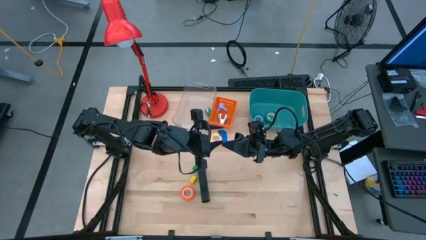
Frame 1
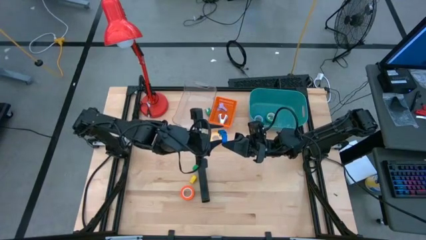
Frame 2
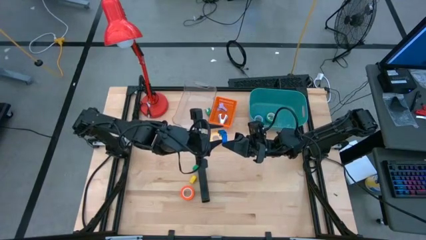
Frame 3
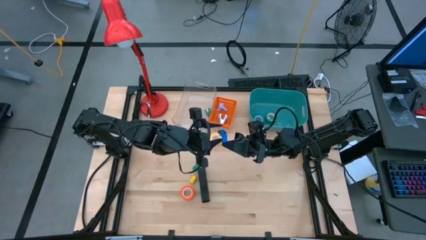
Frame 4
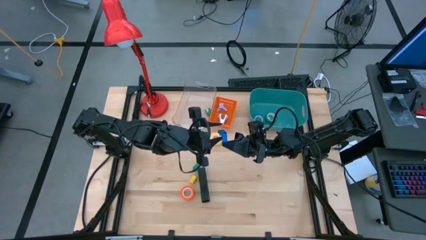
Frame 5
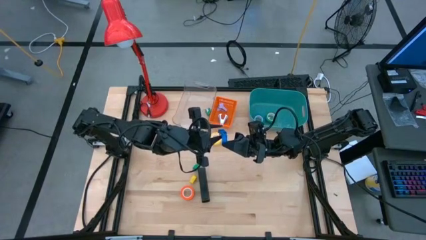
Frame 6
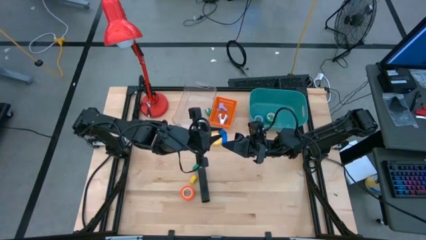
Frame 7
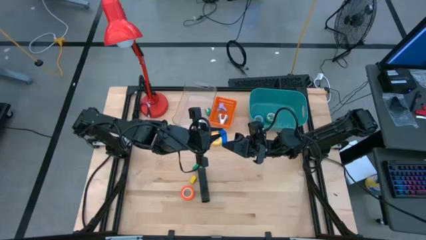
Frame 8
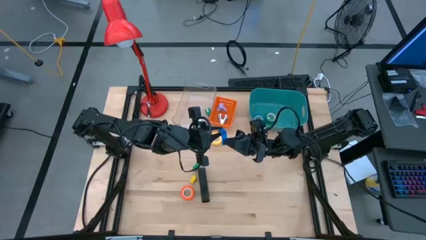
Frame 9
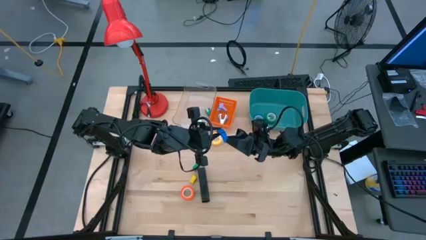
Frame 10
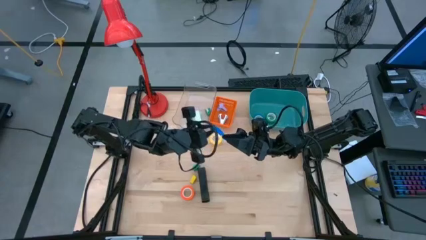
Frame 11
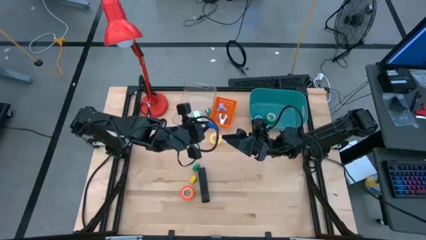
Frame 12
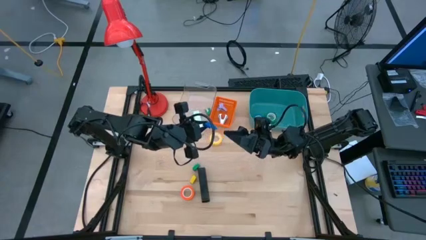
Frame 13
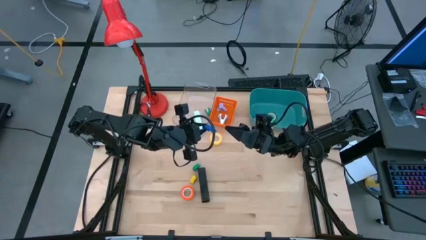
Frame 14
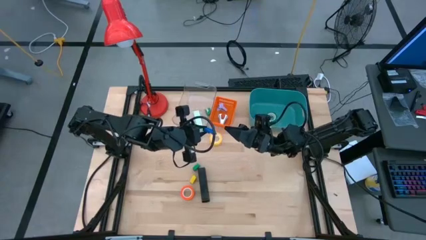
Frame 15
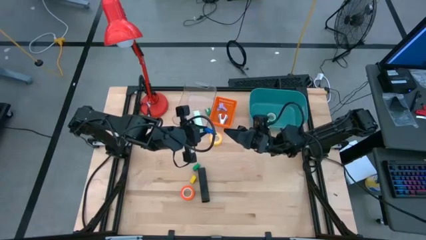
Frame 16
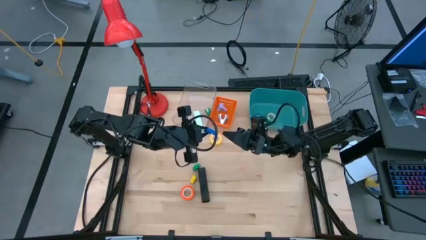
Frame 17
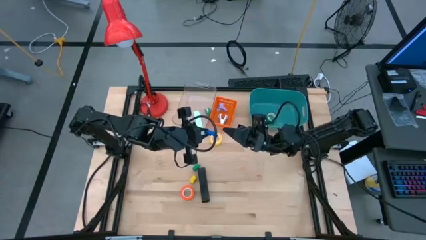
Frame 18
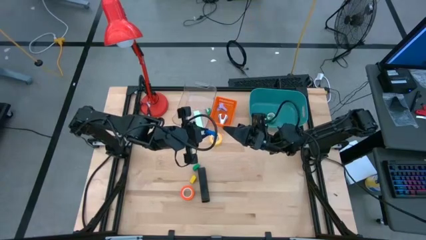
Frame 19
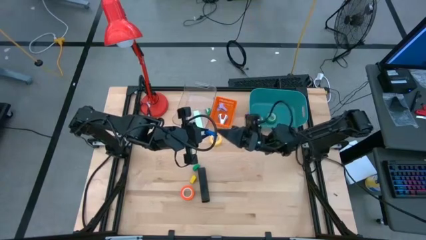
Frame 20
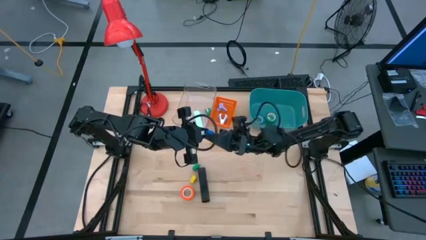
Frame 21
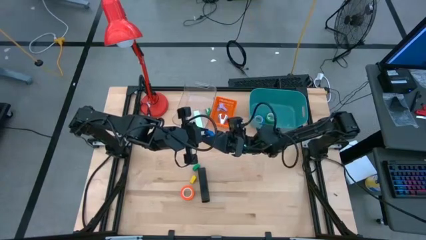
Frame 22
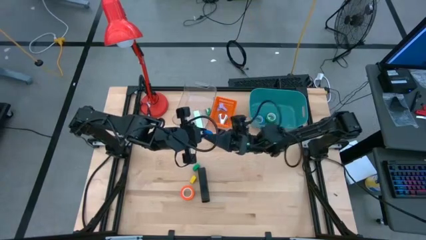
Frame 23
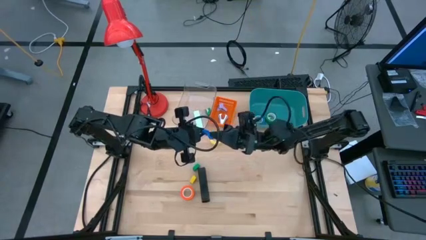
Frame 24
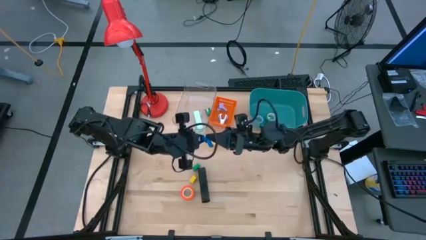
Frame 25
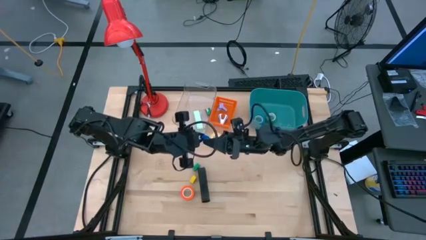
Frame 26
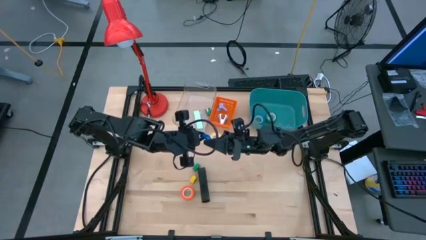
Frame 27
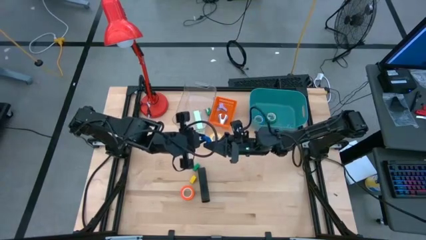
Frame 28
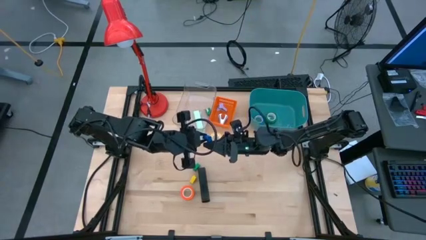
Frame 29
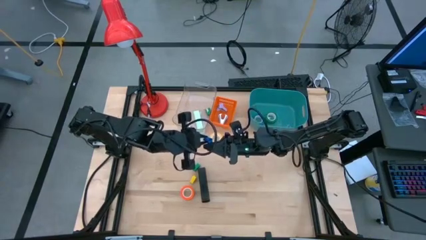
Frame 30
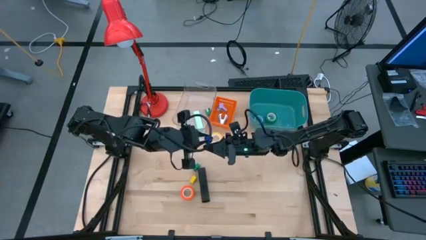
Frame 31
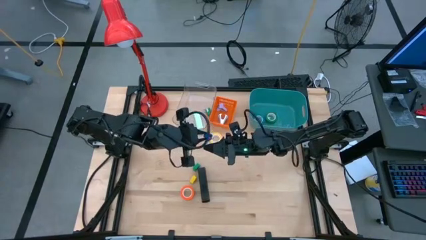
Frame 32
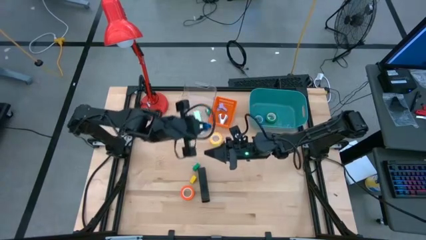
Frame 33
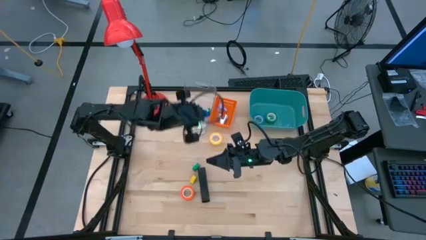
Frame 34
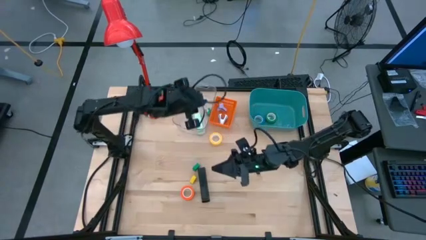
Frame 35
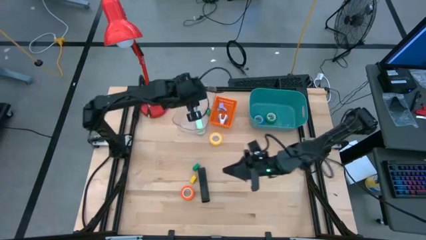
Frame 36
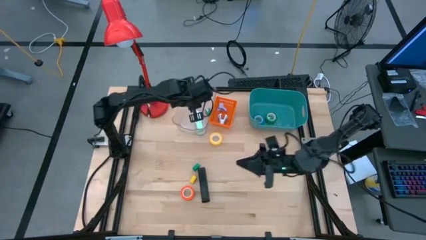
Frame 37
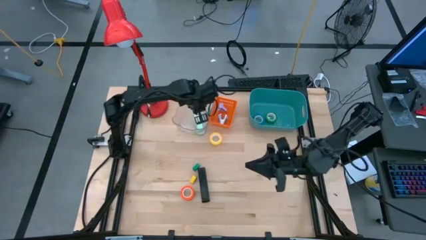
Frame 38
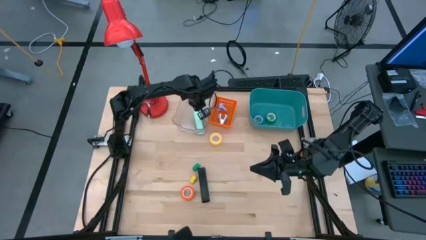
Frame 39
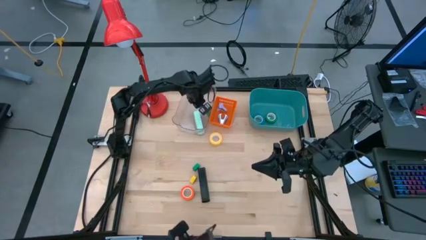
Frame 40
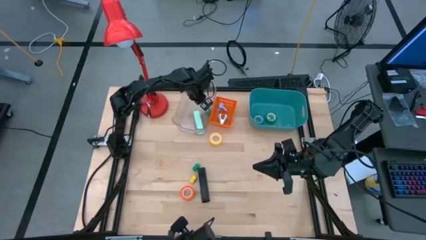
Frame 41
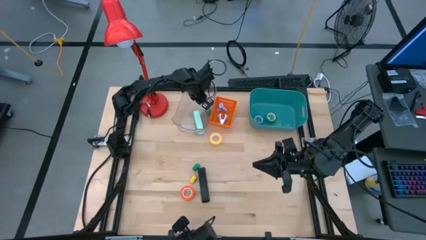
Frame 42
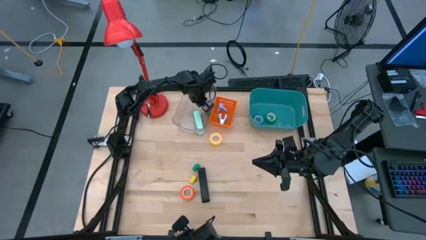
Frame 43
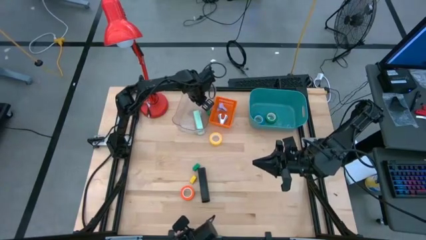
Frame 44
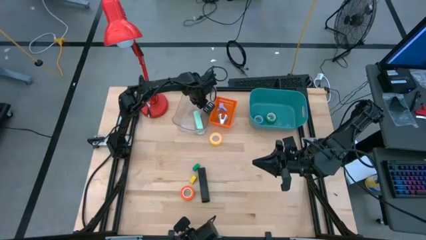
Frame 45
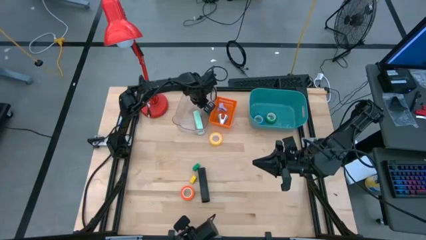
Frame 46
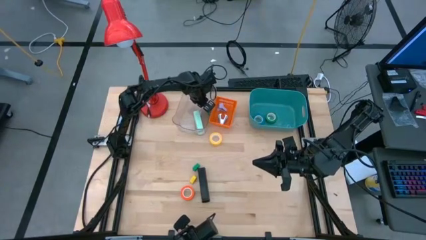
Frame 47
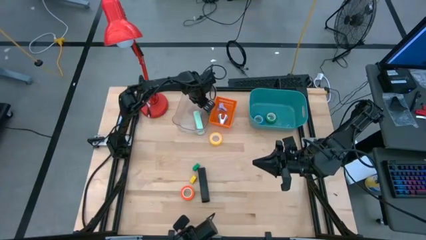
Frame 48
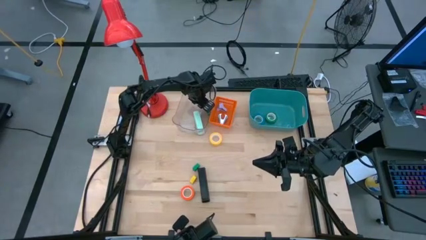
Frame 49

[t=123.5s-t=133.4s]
Task: Pick and place Stapler, Stapler remover, tape
Put the blue stapler into the transparent bin

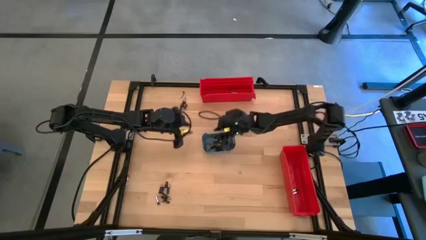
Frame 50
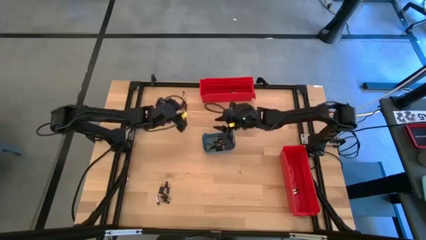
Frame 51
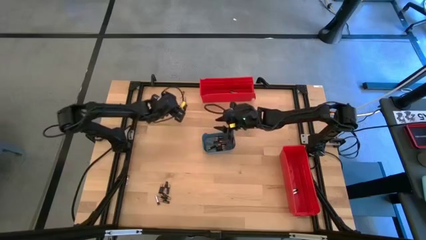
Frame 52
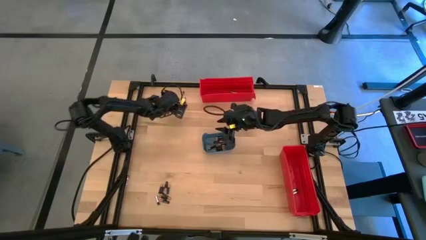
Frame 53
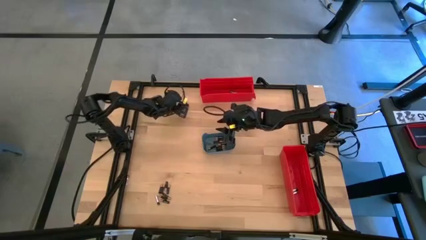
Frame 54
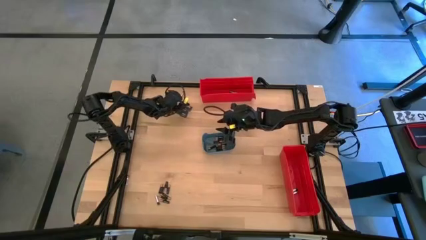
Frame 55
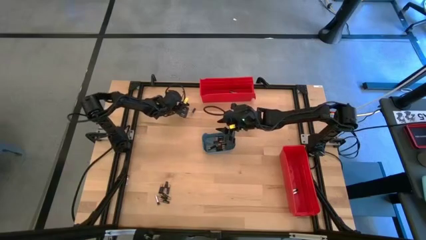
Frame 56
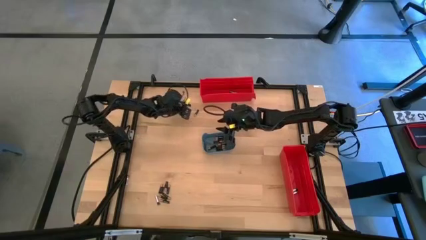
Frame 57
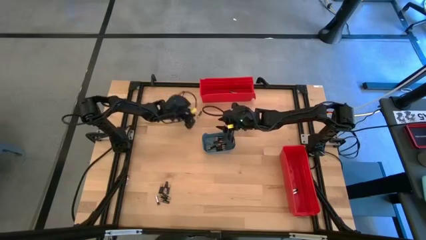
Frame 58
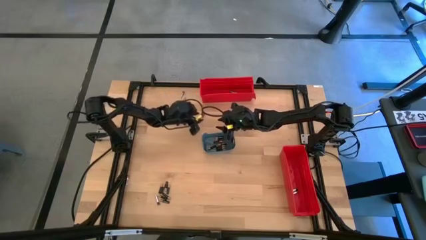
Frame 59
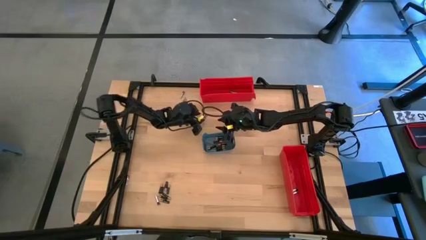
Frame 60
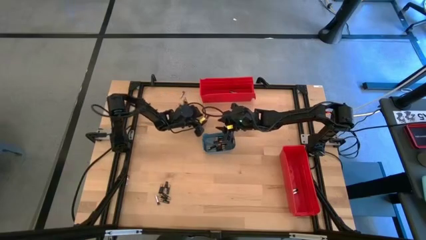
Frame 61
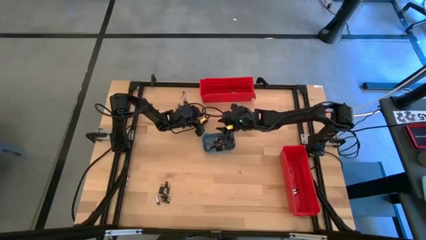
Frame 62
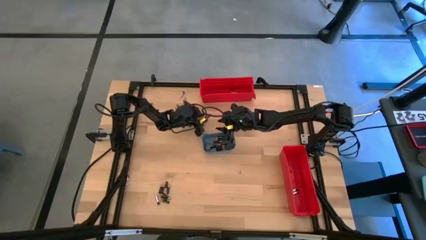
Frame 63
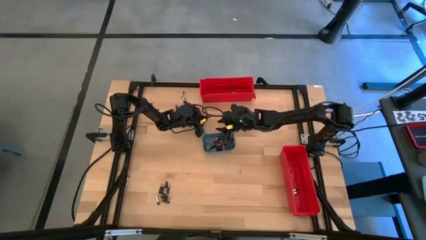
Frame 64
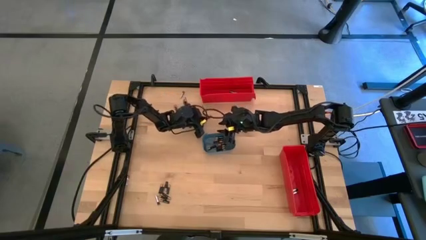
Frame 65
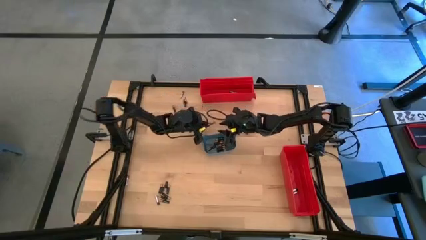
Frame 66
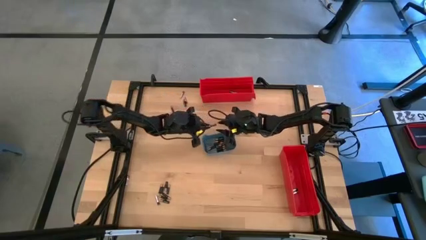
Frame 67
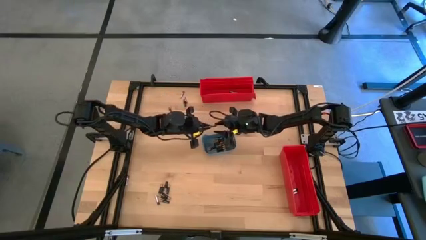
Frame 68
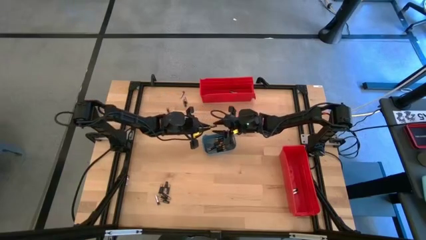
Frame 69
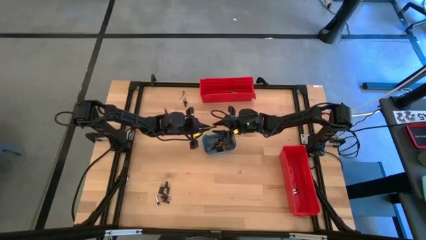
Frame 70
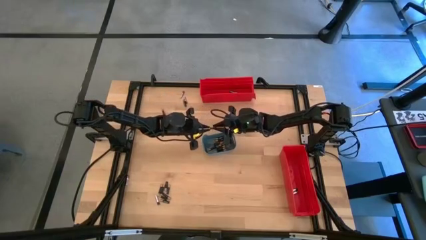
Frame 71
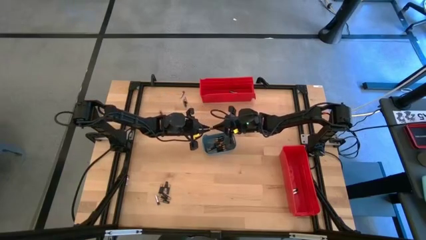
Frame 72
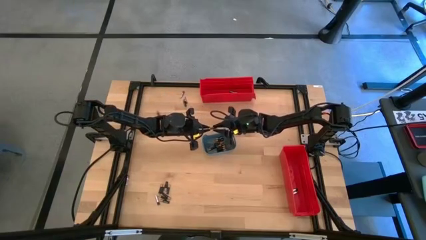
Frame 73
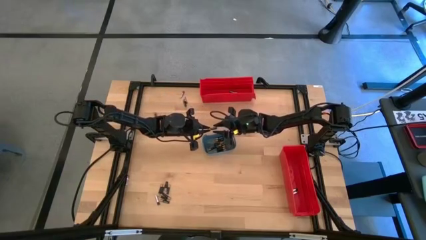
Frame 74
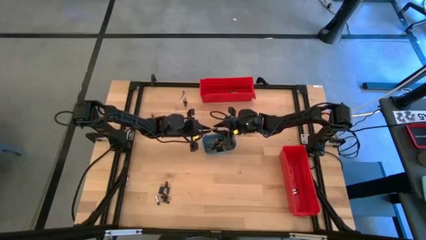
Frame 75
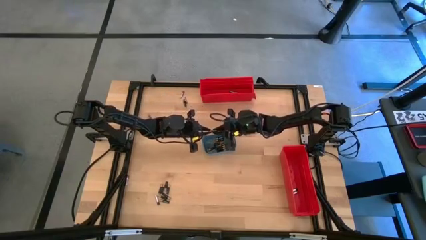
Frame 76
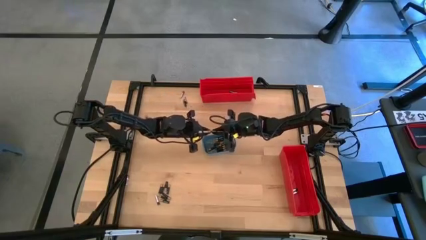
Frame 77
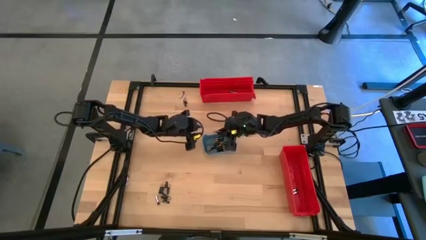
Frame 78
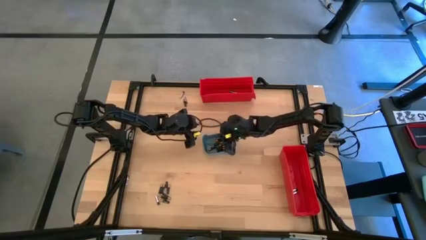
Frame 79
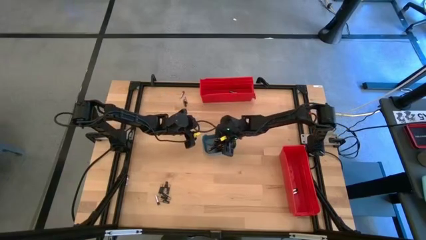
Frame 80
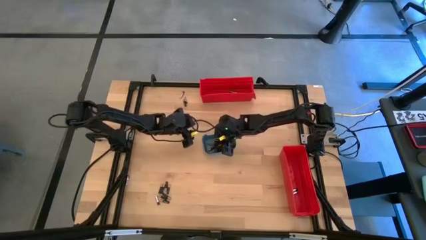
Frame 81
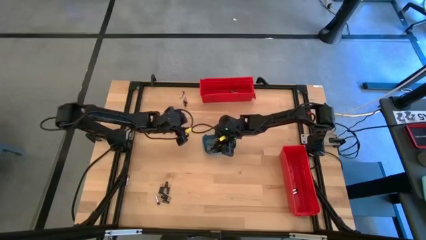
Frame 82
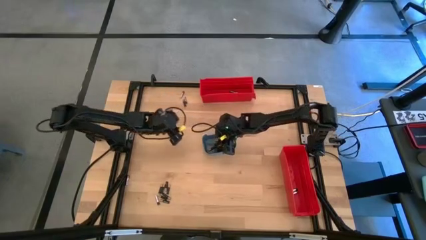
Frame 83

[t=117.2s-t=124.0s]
Task: Sort batteries
Put the black battery into the blue bin
